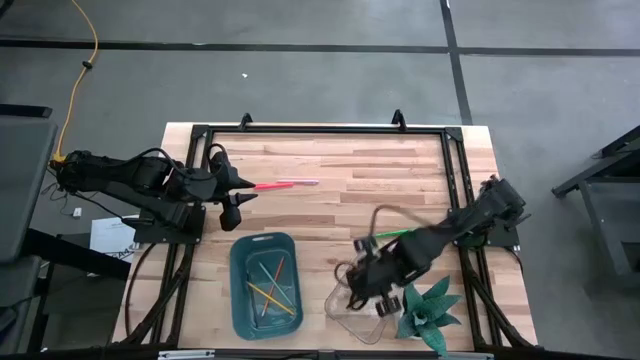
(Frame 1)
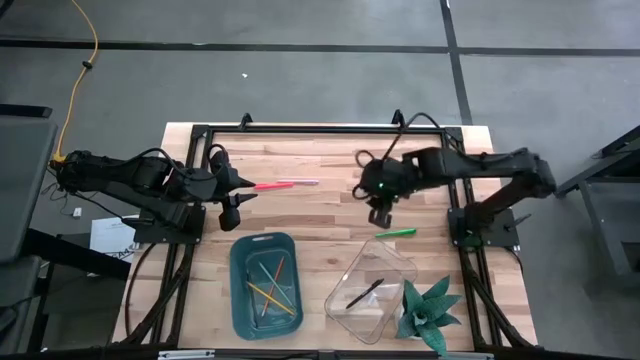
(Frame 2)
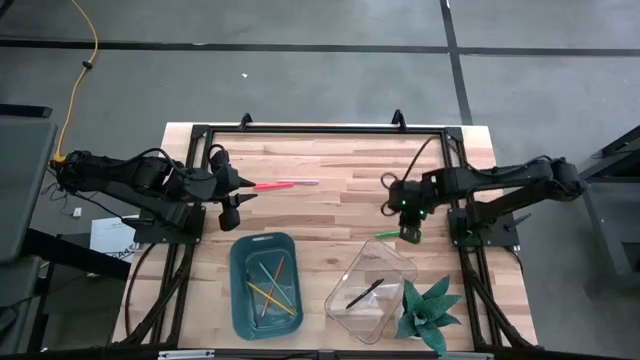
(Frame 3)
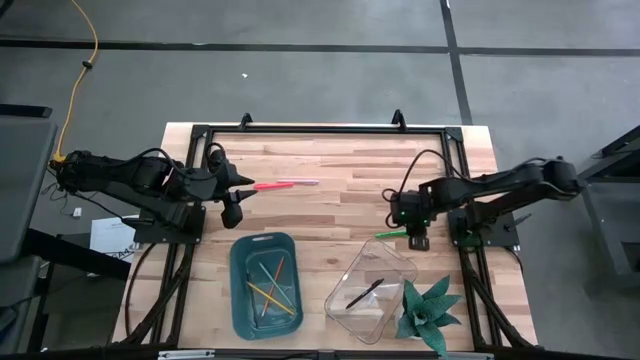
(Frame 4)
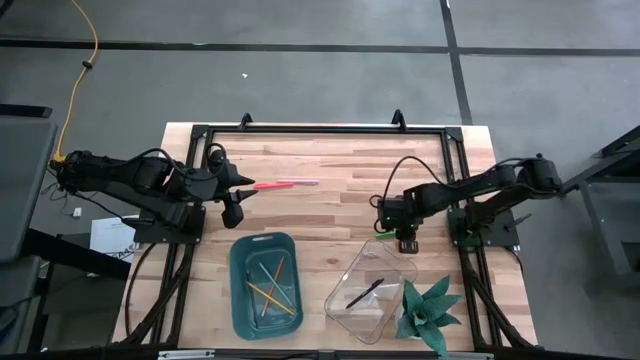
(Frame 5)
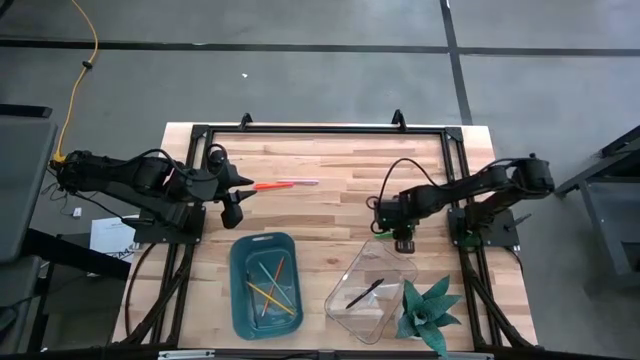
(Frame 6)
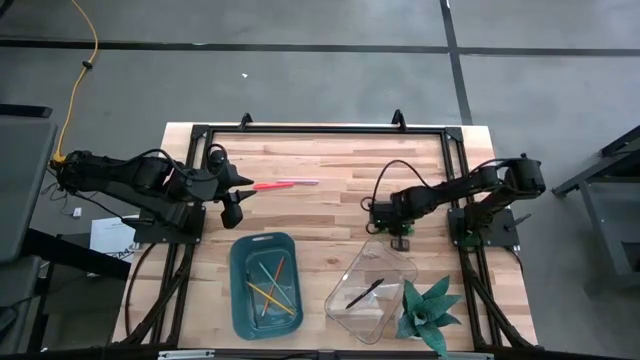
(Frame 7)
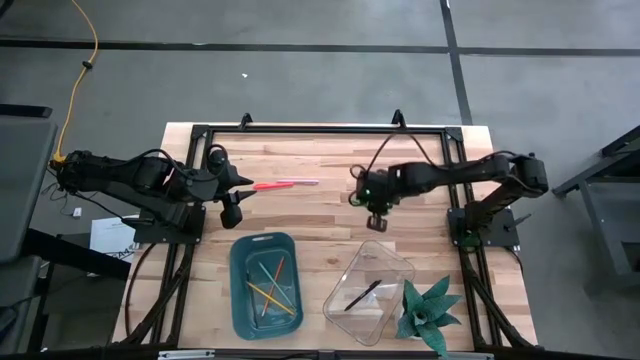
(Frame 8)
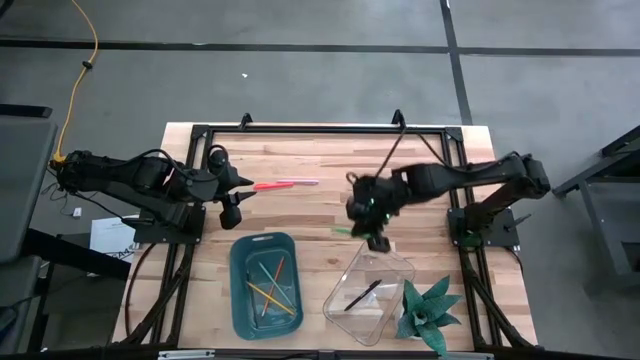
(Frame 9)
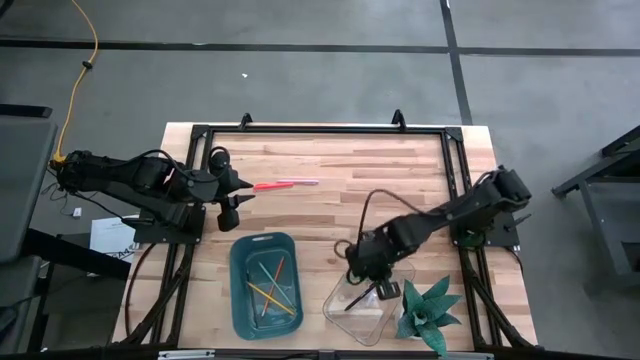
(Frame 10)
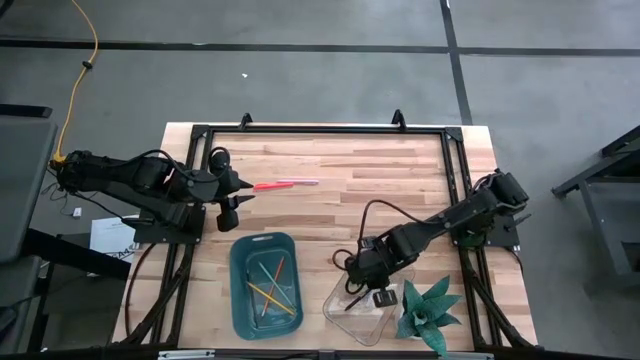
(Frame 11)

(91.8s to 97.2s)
Task: Sort pens & pencils
Put the green pen into the transparent bin

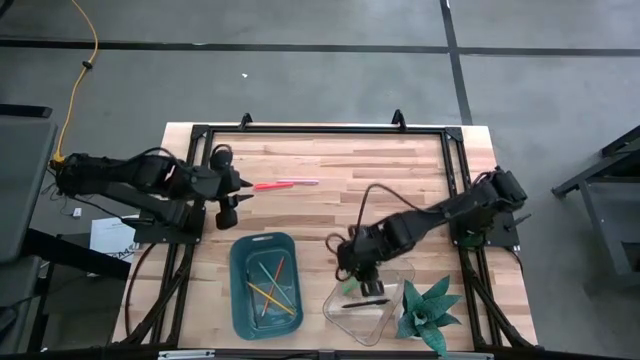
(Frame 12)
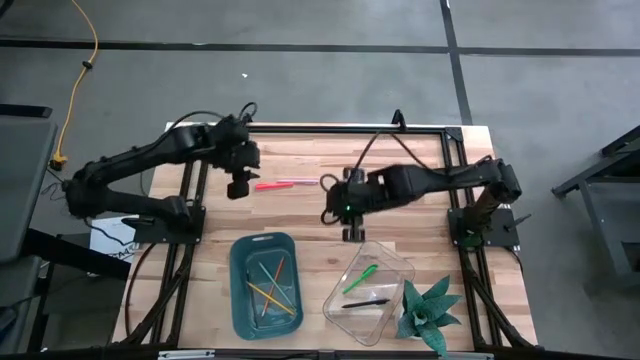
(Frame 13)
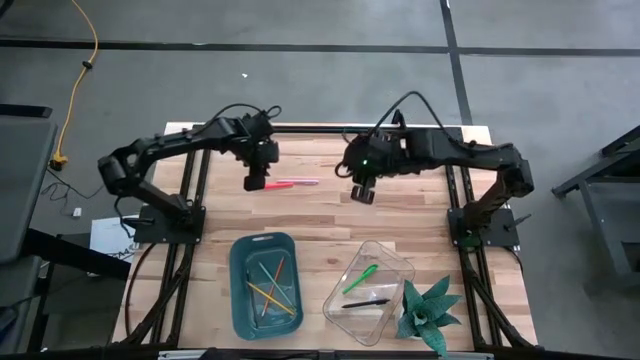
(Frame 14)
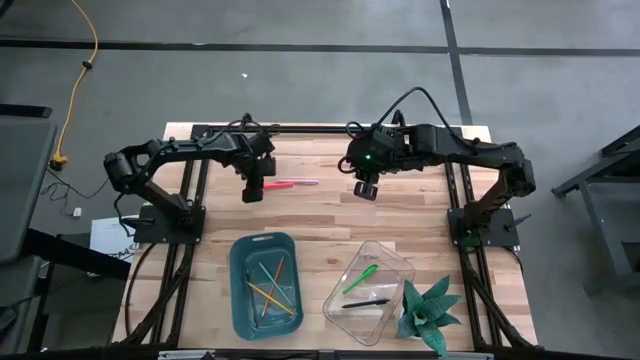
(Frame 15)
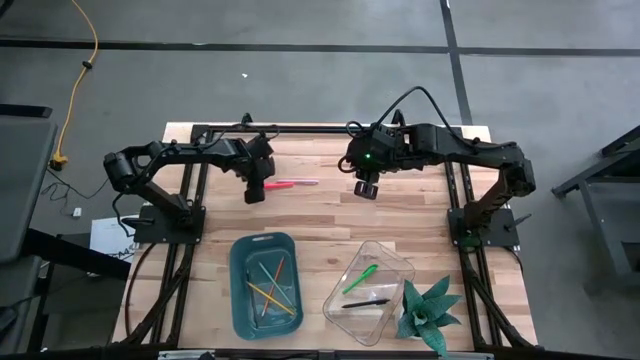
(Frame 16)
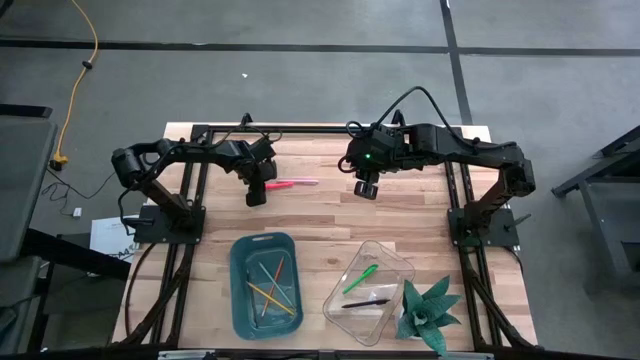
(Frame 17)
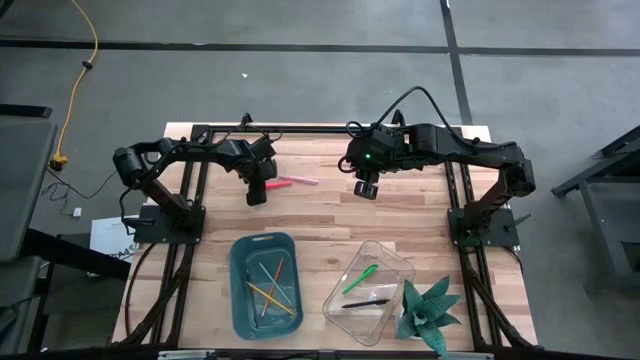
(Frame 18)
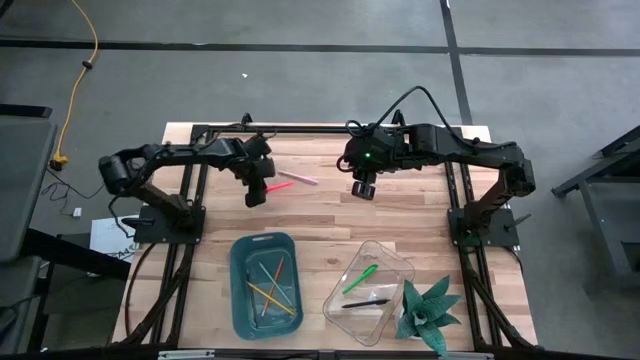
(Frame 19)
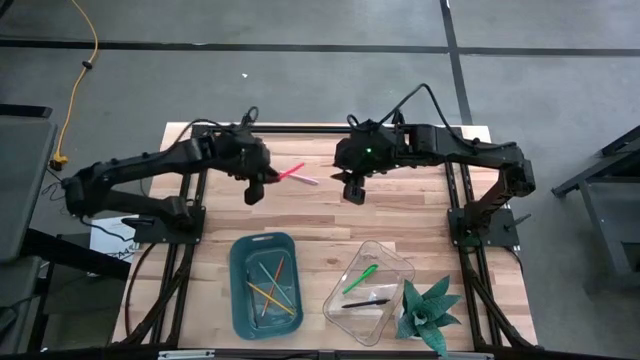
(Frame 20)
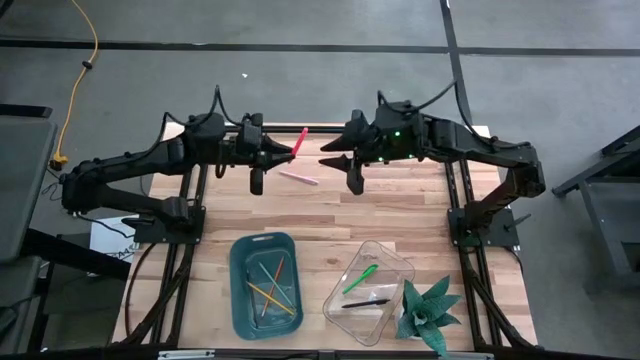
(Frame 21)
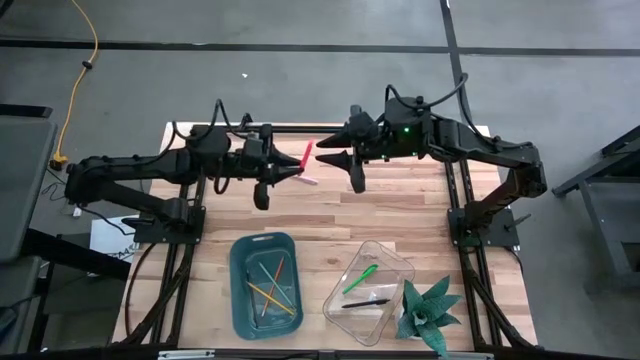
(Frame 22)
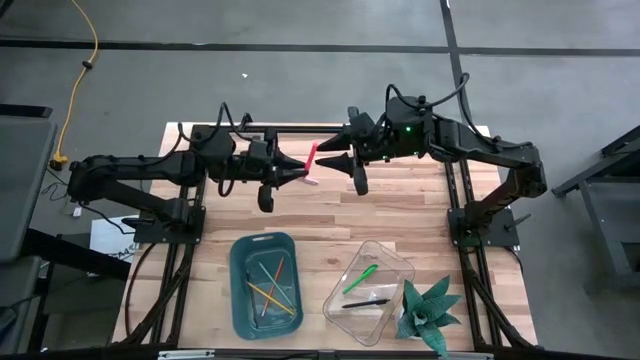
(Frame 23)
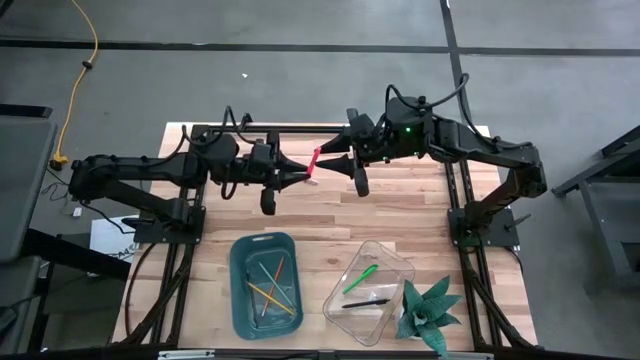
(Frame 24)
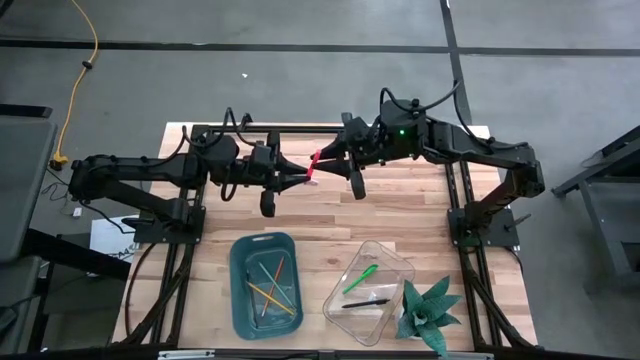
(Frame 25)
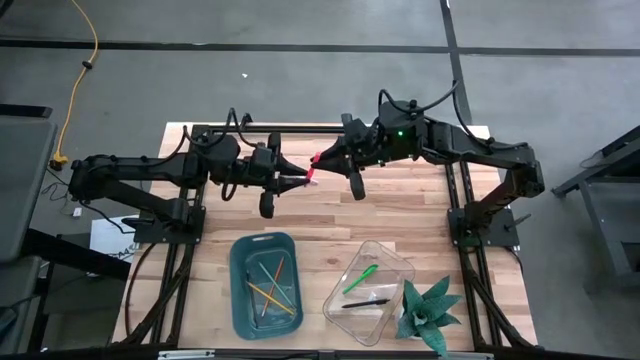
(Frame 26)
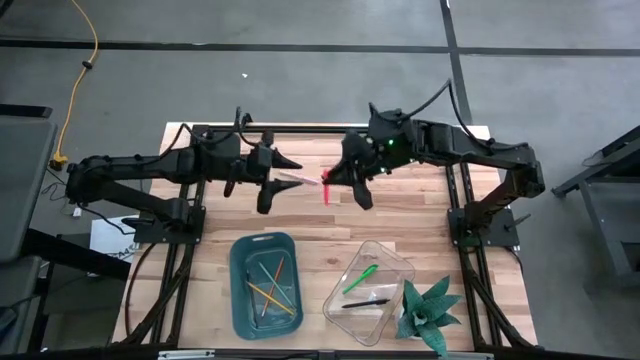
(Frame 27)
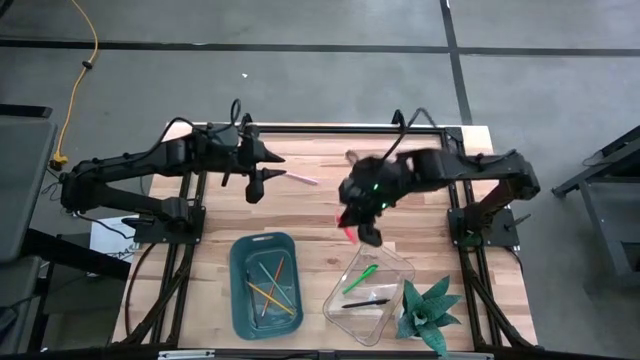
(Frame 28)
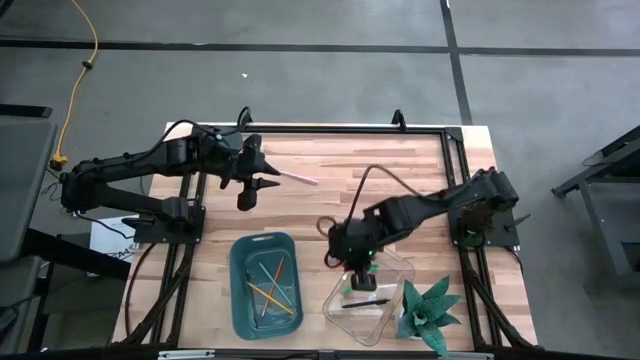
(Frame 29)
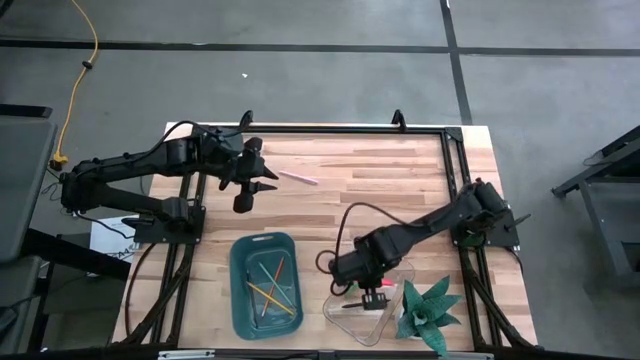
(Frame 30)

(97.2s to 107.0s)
Put the orange pen into the transparent bin

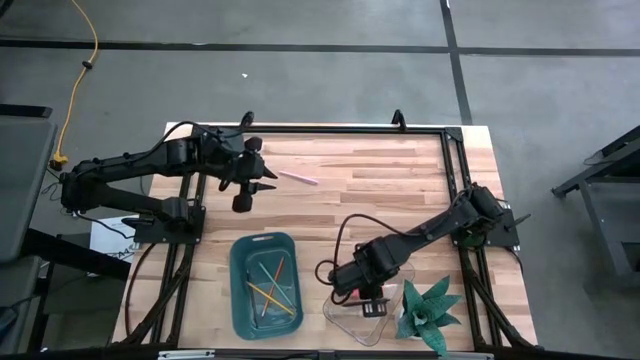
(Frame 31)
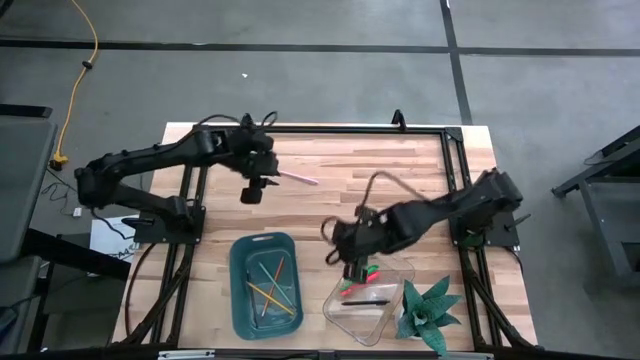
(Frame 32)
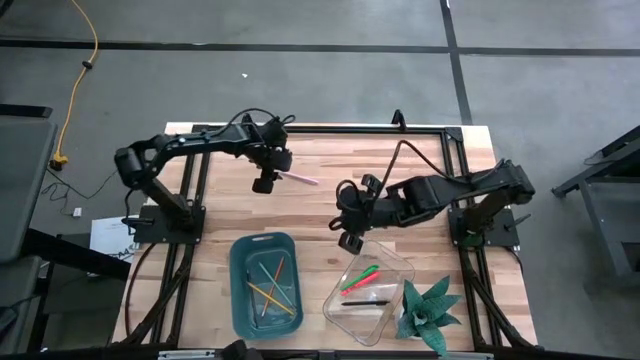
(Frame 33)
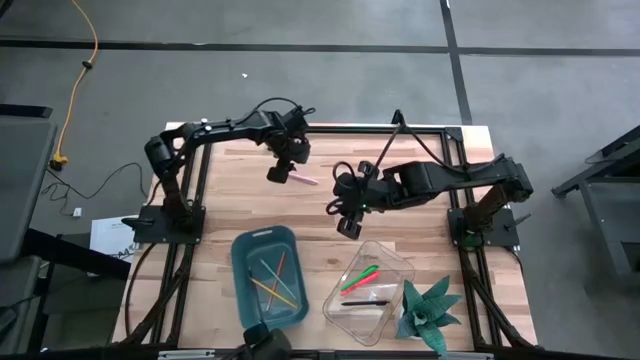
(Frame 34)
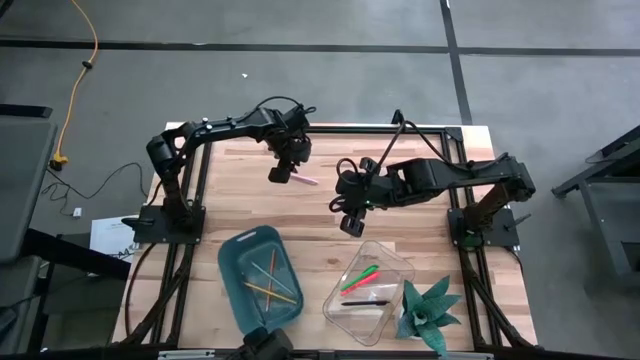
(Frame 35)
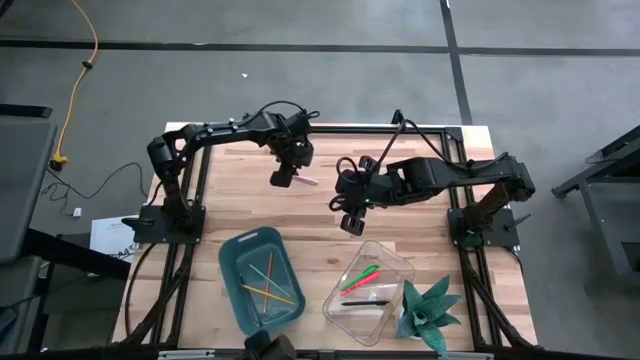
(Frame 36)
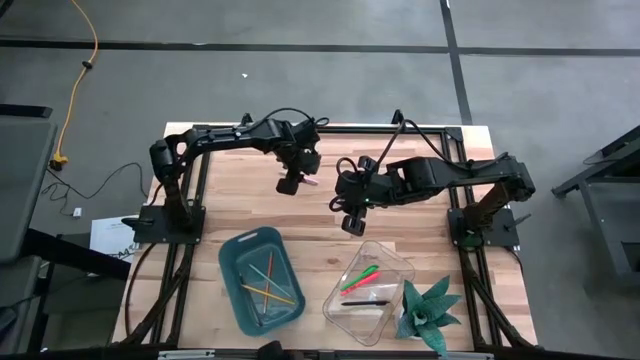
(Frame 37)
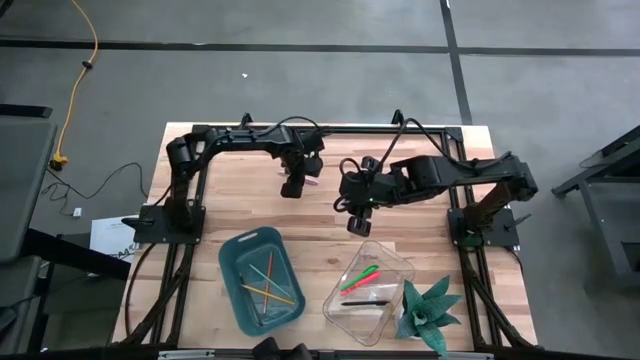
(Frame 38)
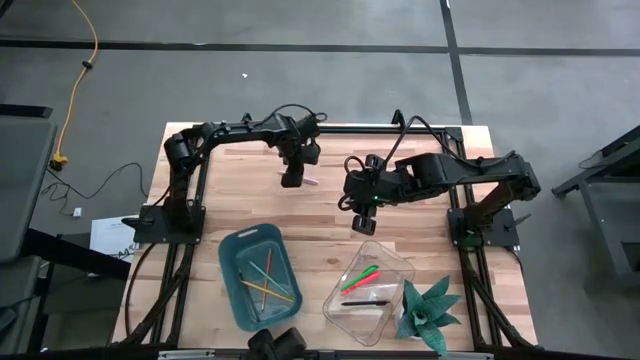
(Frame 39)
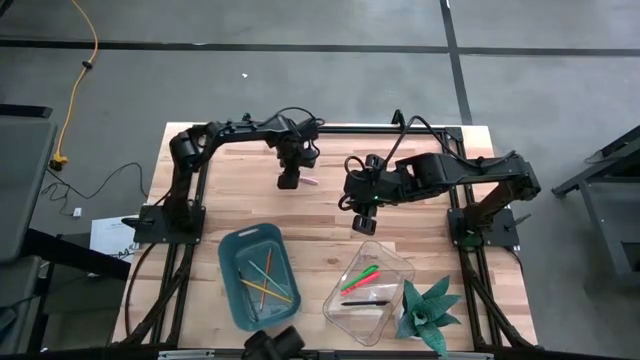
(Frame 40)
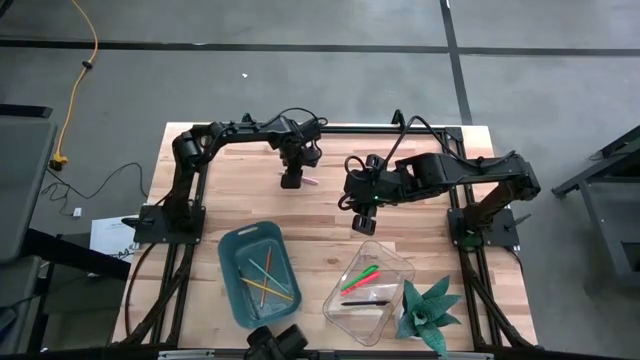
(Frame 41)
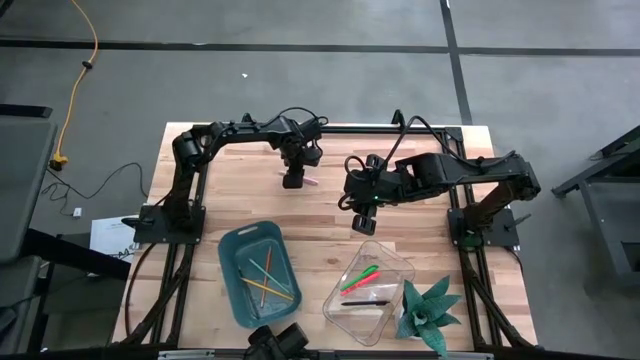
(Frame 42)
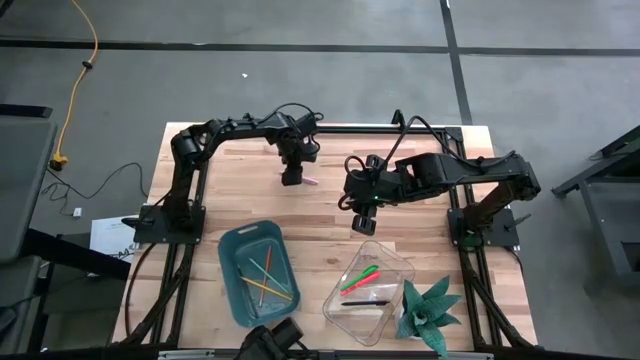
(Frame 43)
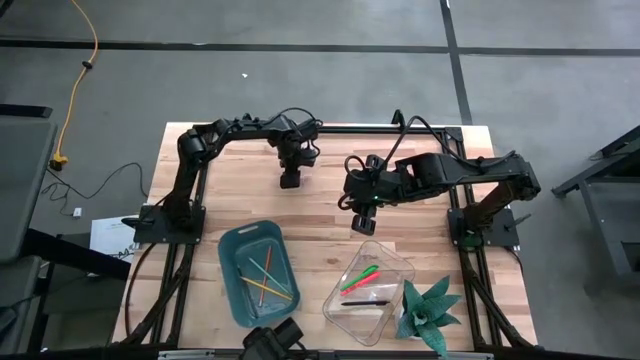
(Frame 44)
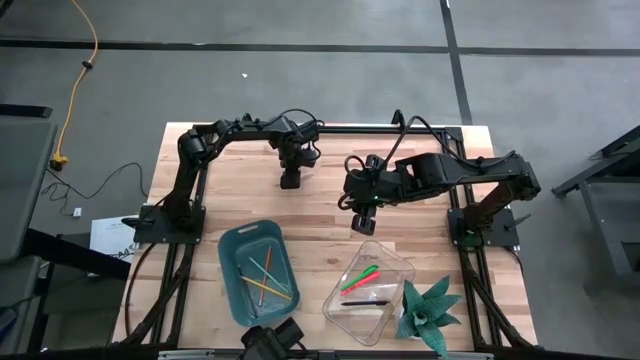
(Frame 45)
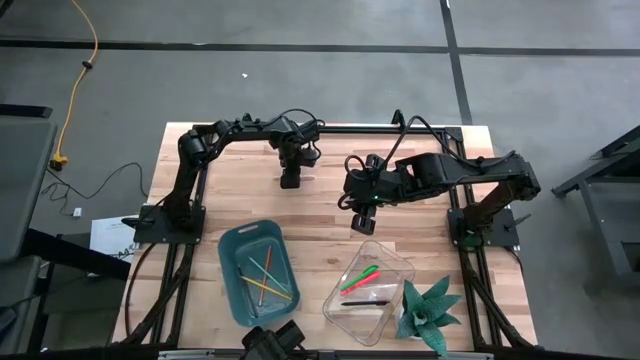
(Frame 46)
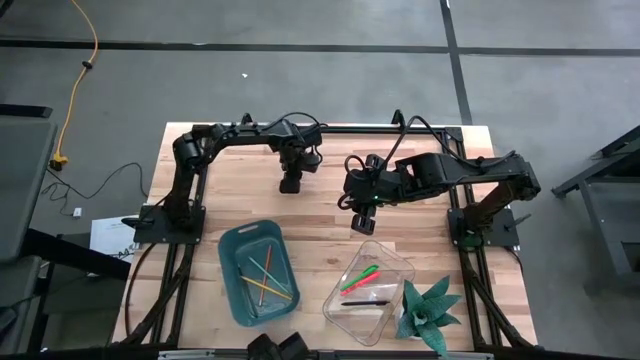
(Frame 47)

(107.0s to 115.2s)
Put the pink pen into the transparent bin
